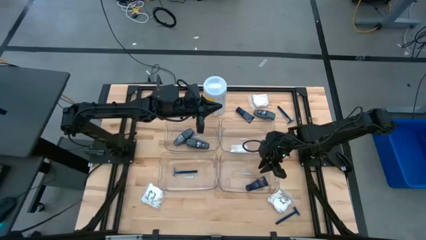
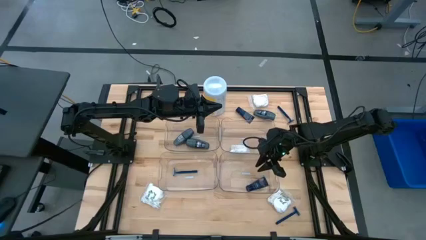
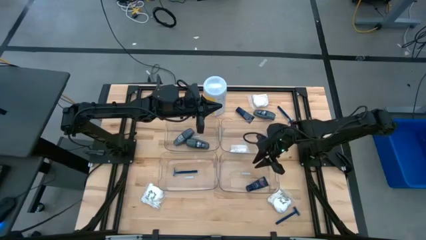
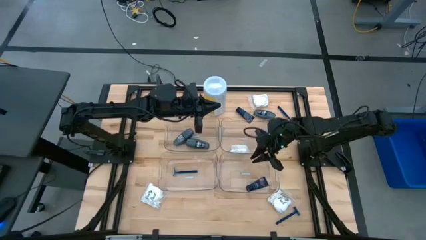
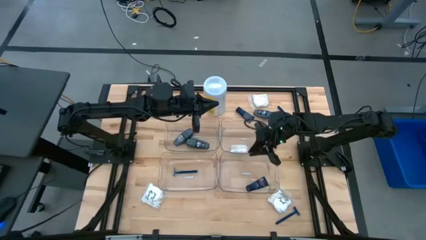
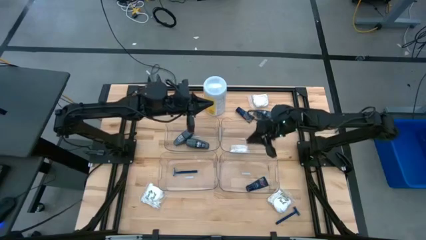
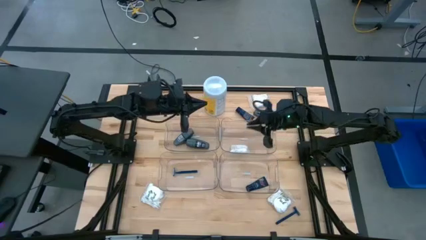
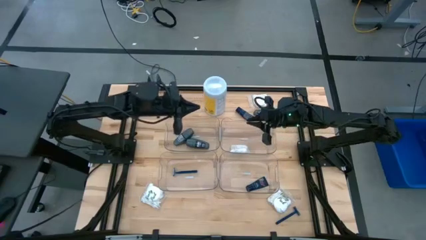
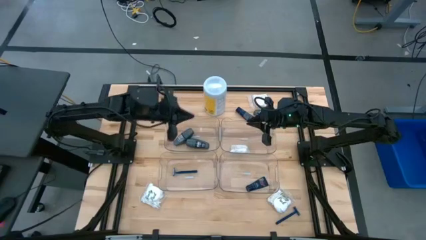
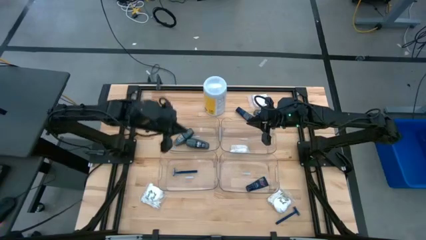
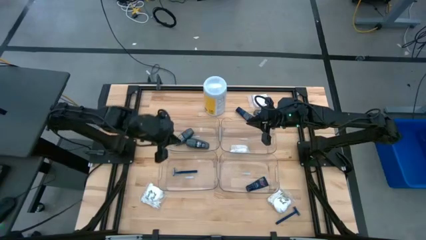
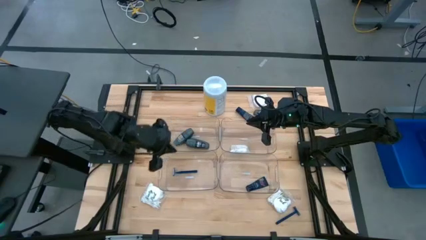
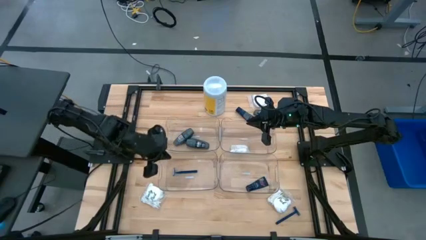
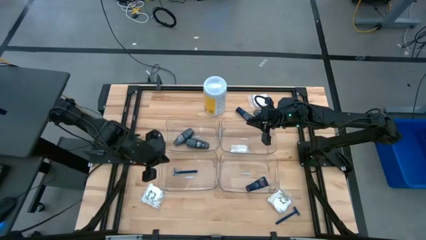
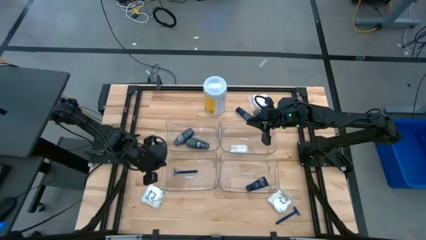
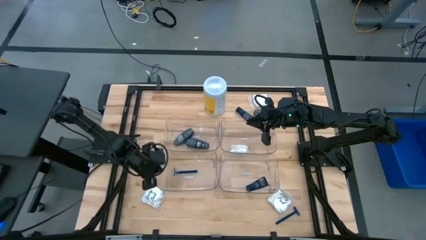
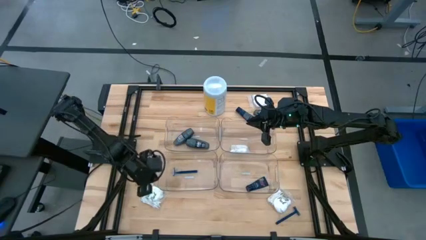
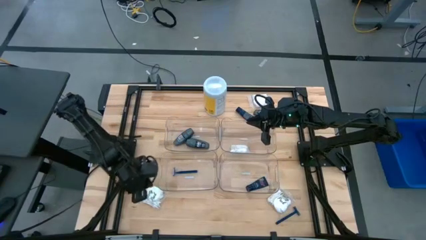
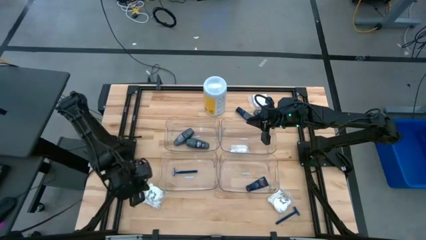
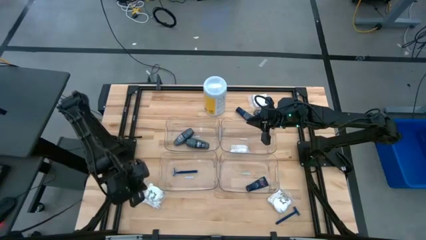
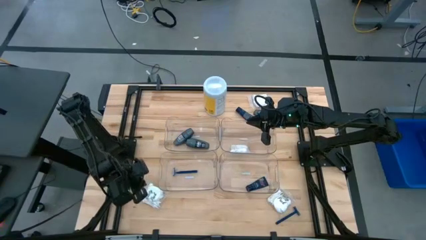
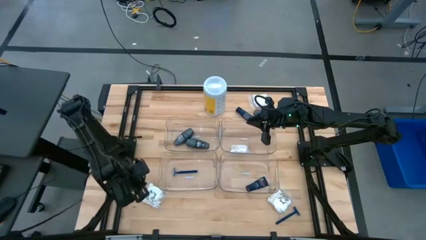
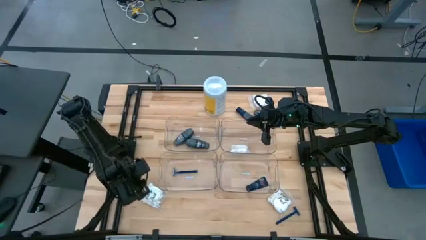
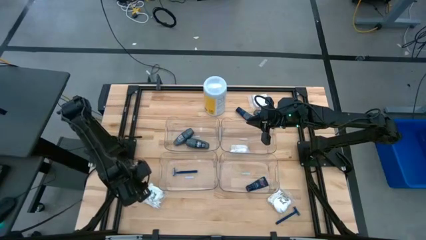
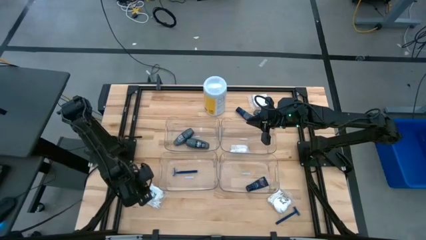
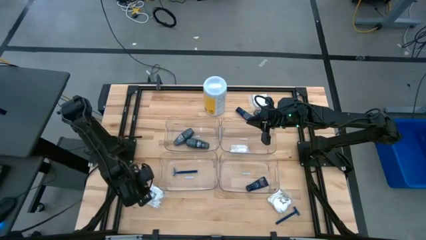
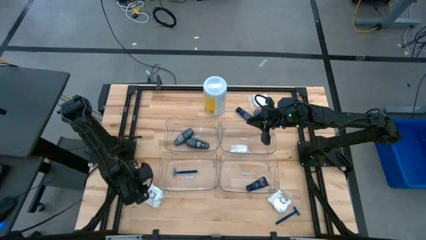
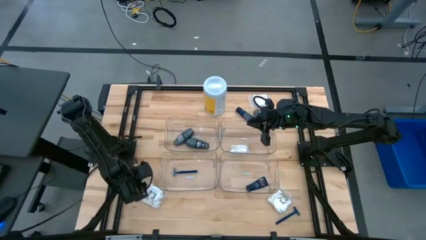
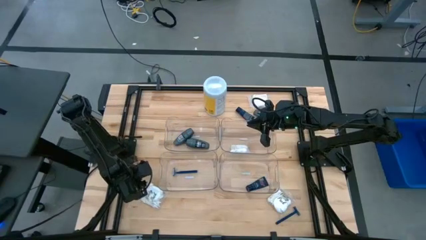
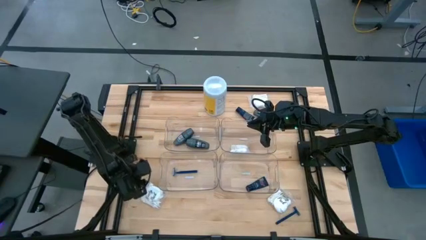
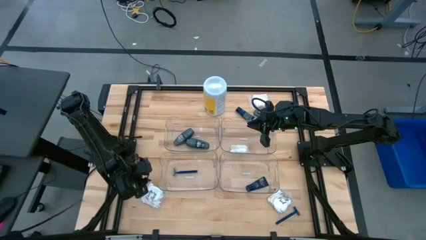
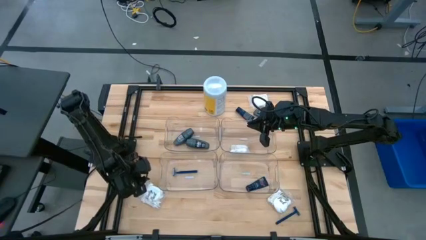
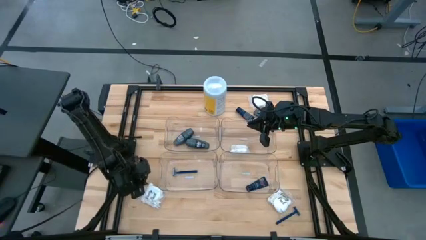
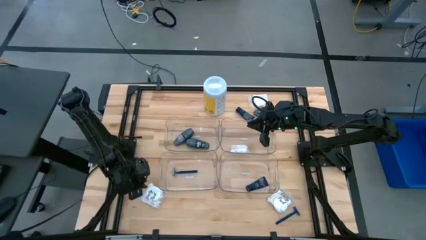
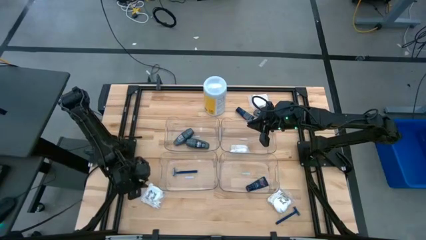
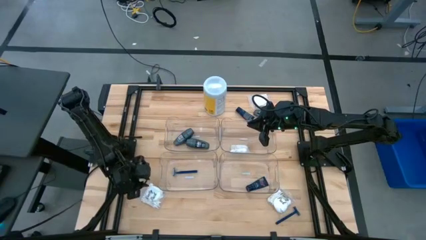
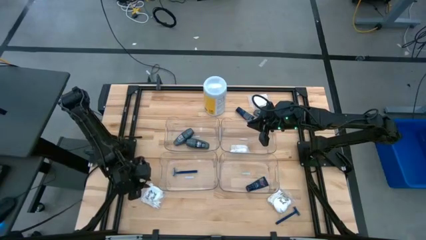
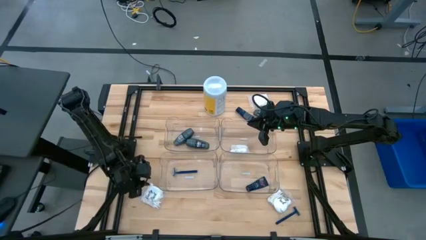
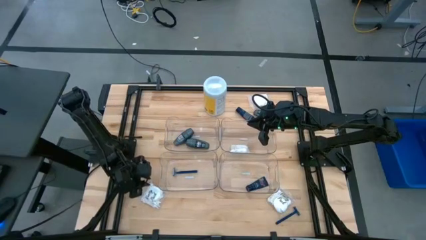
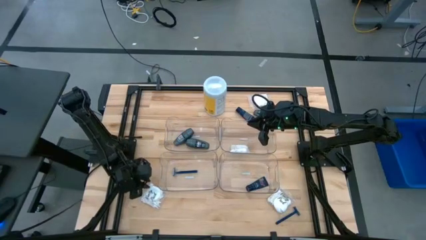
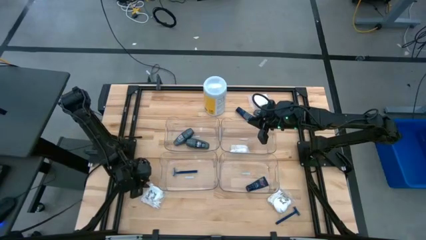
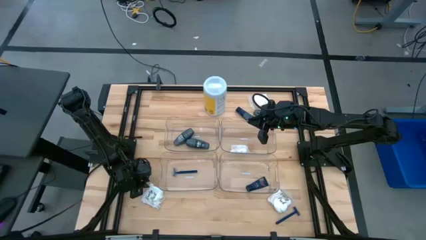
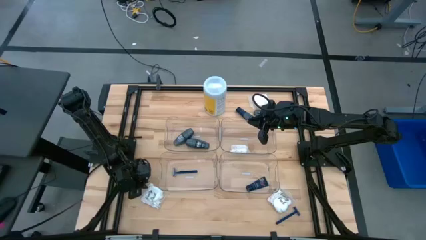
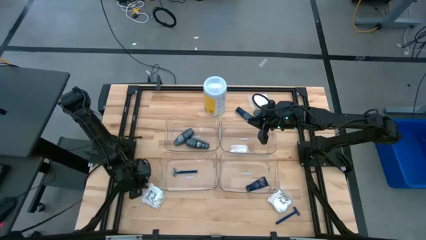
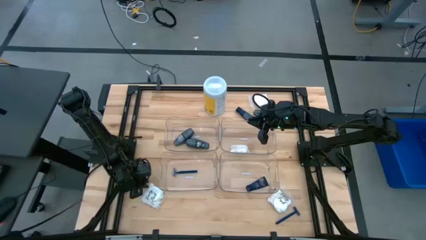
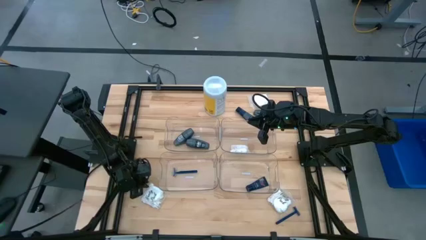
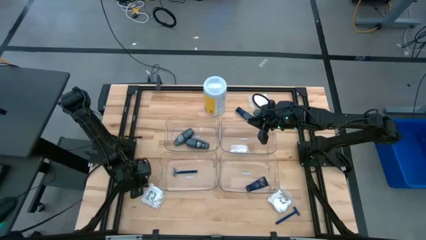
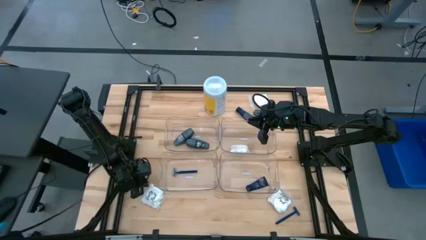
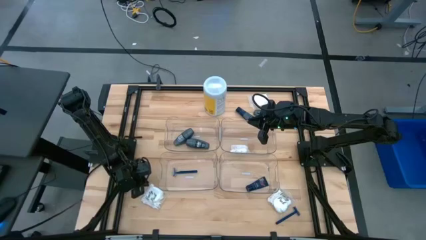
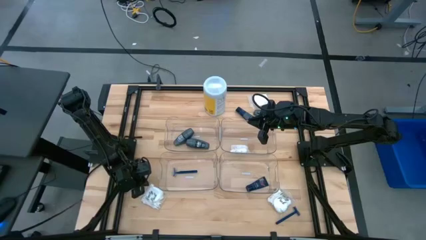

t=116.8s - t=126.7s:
Task: Pick & Place Travel size toiletries
Put the transparent vanity pack into the top right transparent bin
